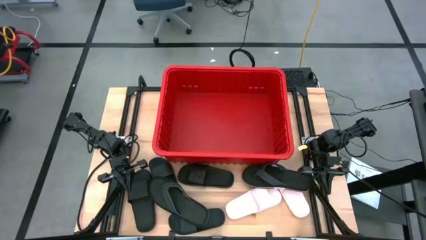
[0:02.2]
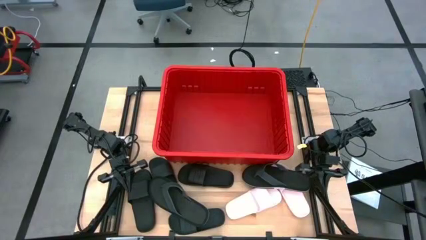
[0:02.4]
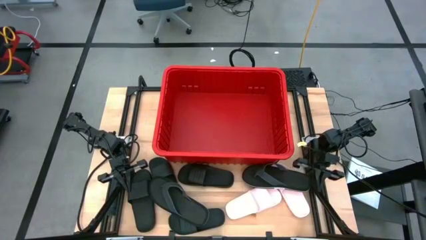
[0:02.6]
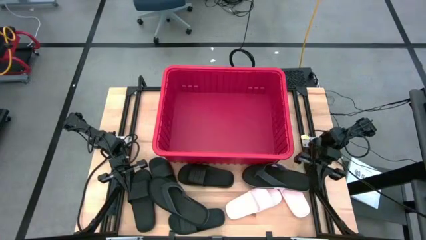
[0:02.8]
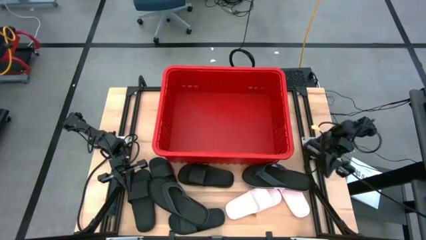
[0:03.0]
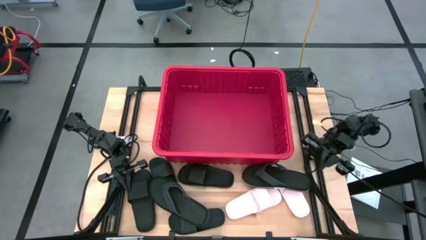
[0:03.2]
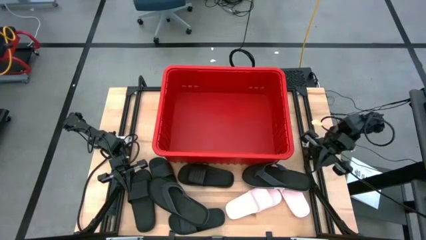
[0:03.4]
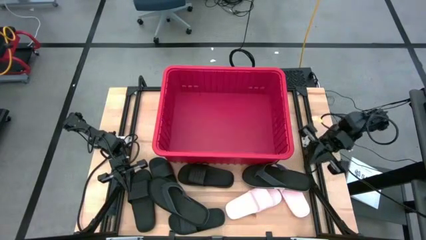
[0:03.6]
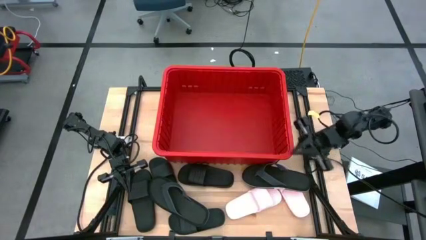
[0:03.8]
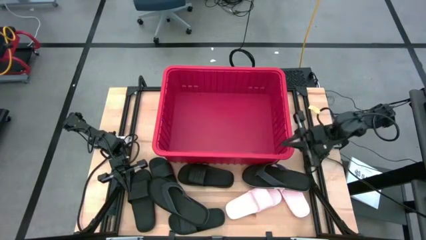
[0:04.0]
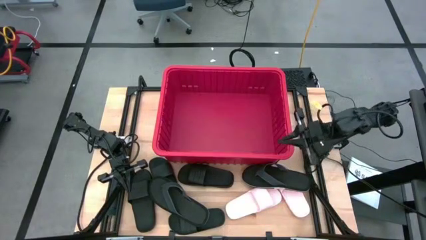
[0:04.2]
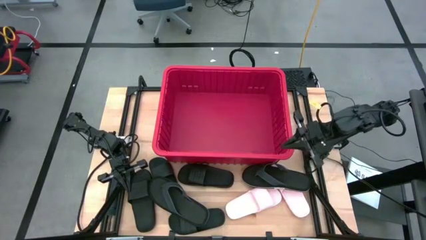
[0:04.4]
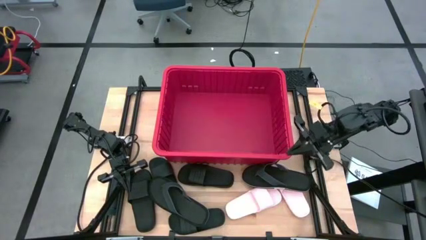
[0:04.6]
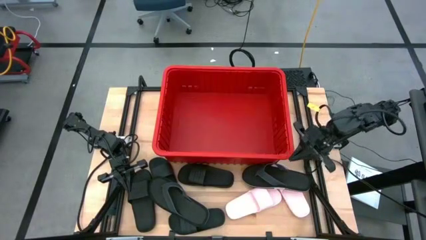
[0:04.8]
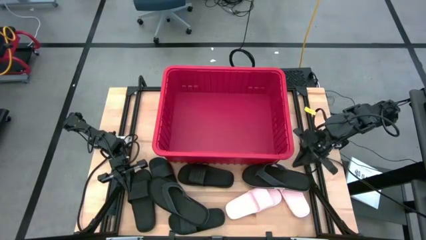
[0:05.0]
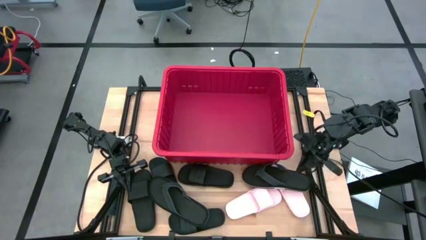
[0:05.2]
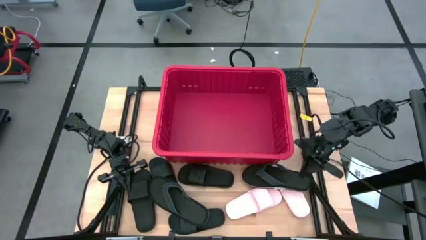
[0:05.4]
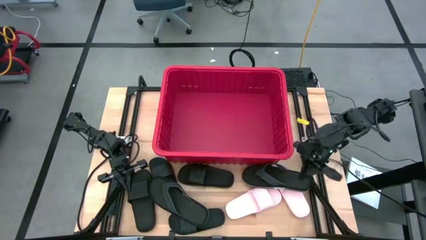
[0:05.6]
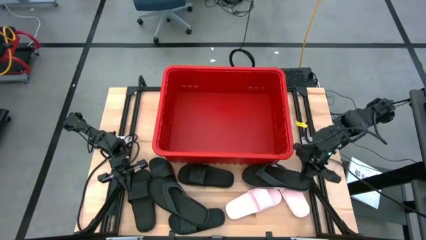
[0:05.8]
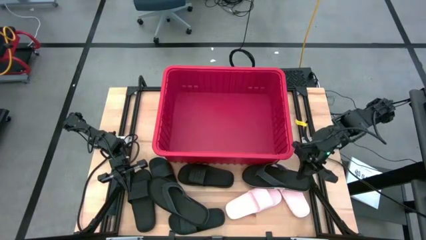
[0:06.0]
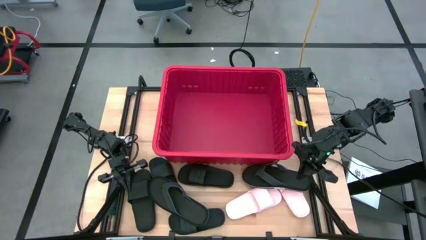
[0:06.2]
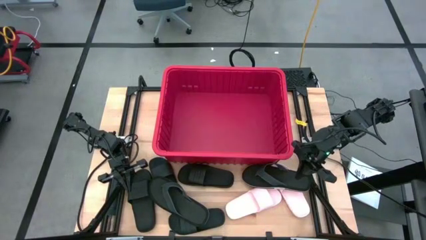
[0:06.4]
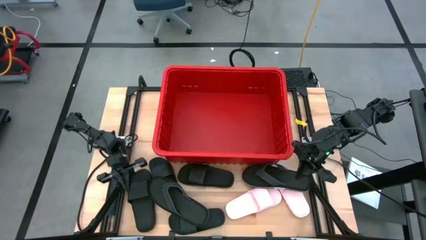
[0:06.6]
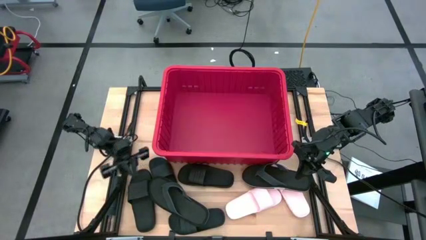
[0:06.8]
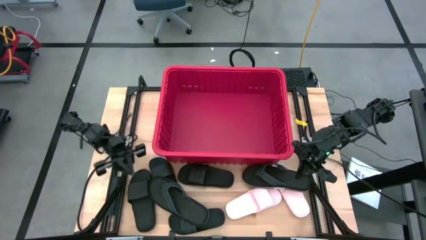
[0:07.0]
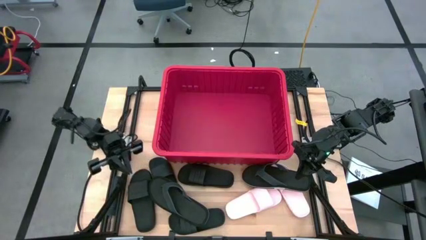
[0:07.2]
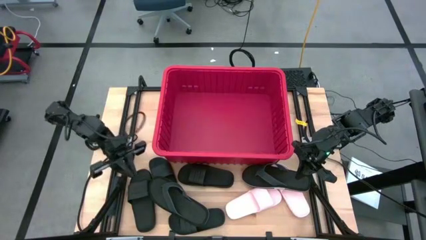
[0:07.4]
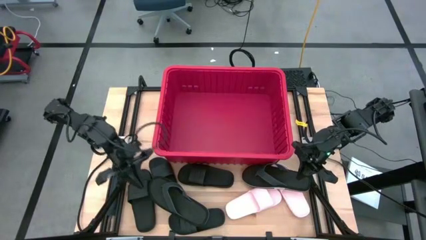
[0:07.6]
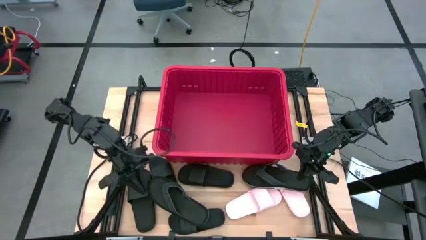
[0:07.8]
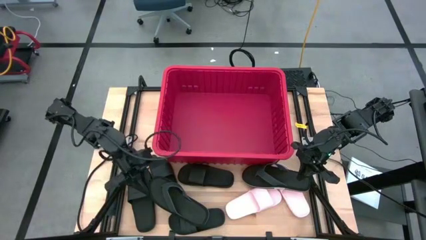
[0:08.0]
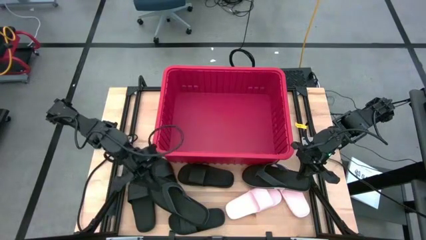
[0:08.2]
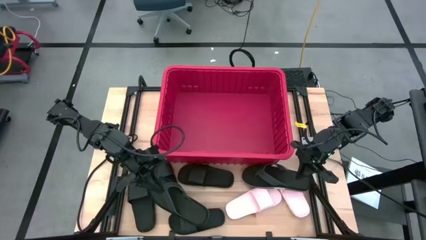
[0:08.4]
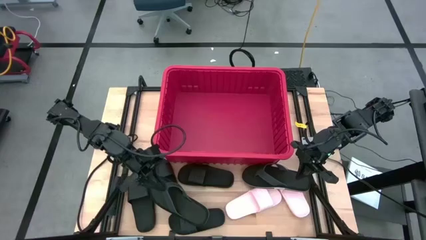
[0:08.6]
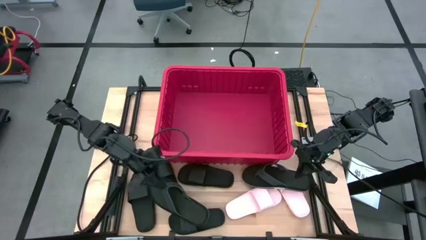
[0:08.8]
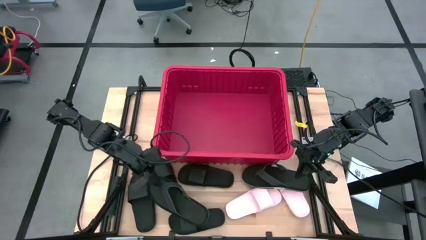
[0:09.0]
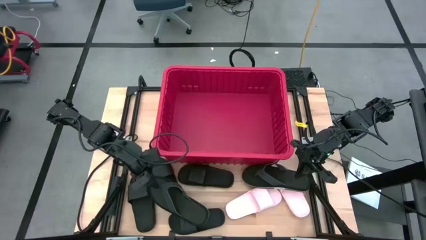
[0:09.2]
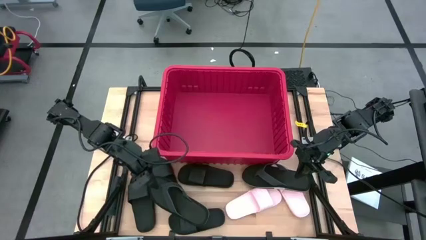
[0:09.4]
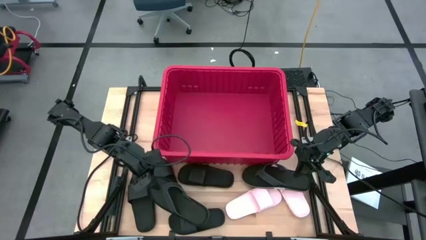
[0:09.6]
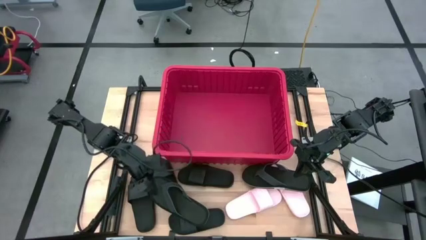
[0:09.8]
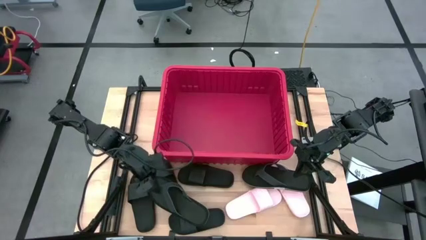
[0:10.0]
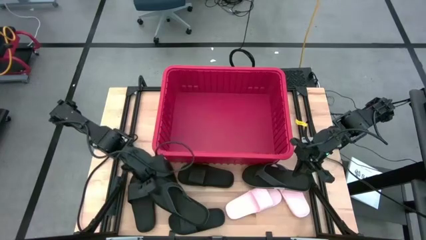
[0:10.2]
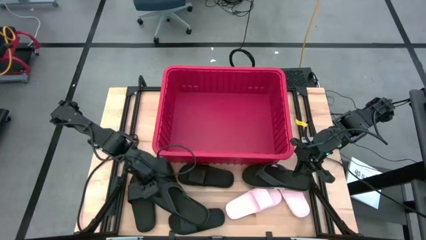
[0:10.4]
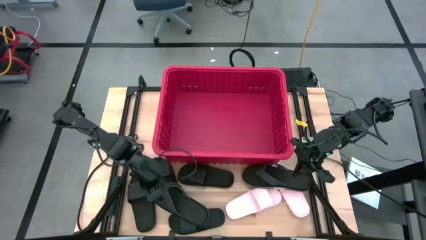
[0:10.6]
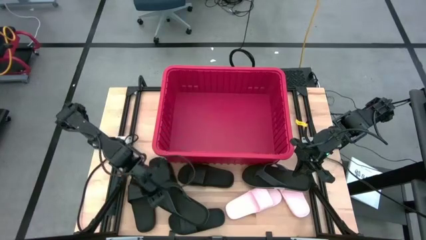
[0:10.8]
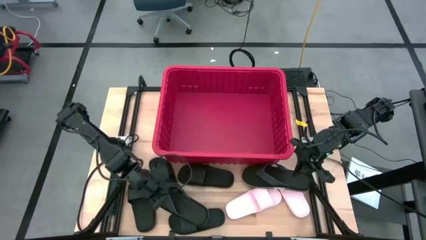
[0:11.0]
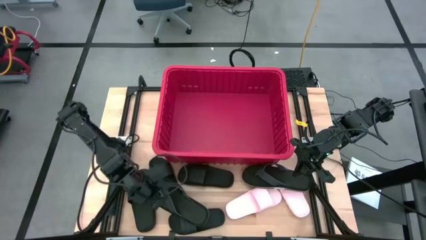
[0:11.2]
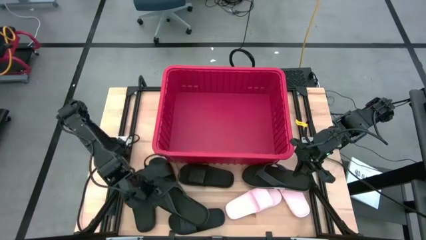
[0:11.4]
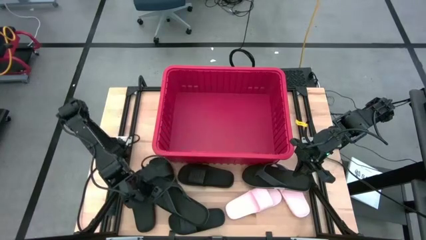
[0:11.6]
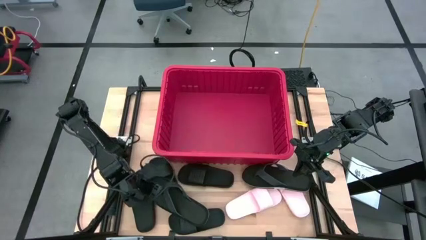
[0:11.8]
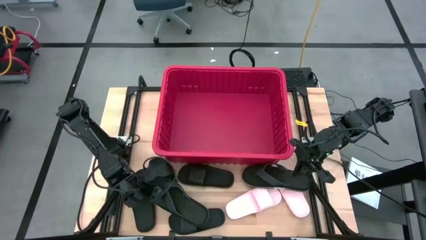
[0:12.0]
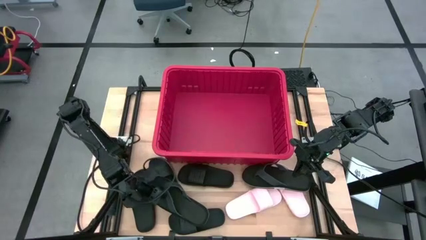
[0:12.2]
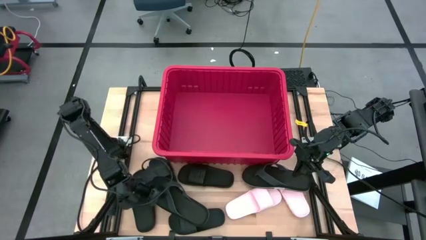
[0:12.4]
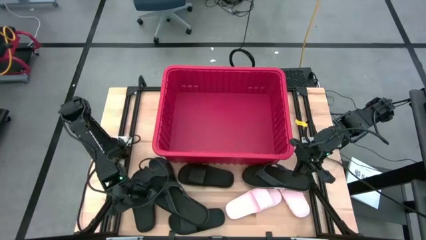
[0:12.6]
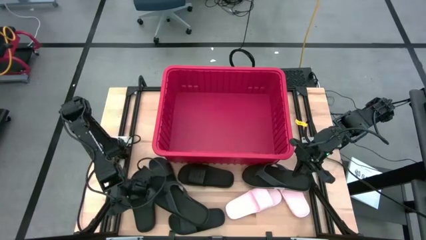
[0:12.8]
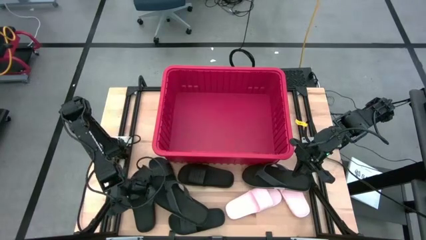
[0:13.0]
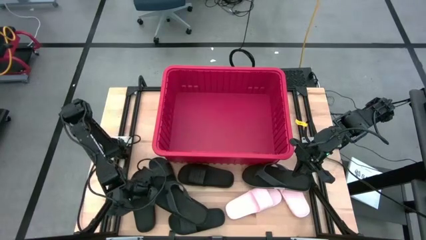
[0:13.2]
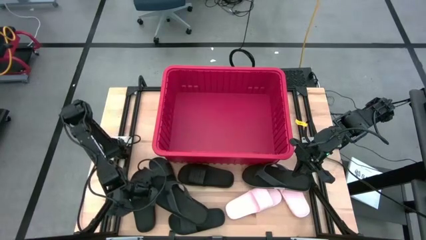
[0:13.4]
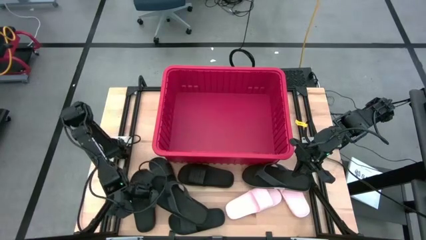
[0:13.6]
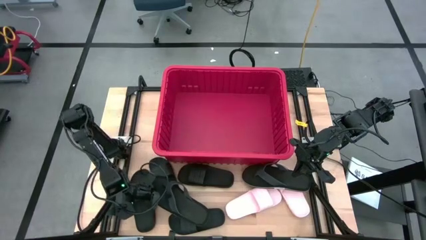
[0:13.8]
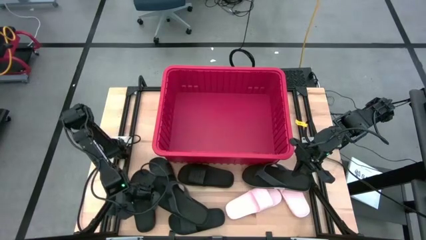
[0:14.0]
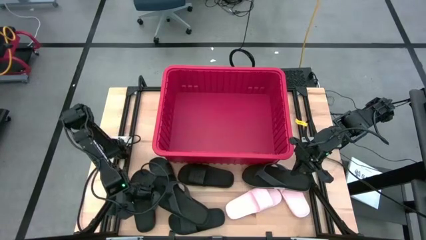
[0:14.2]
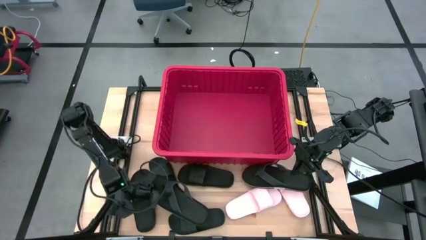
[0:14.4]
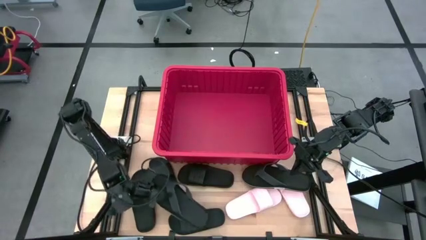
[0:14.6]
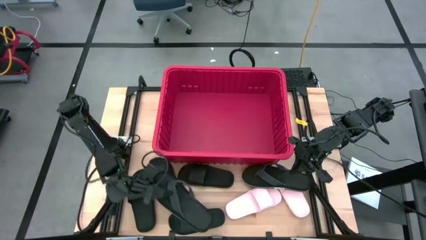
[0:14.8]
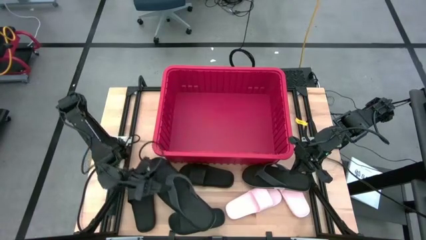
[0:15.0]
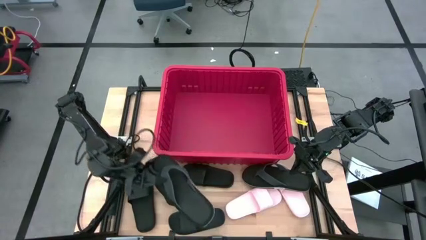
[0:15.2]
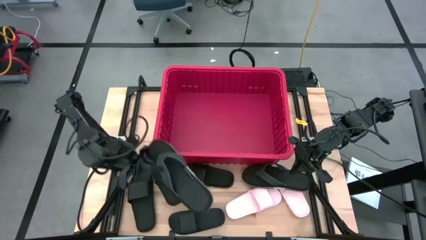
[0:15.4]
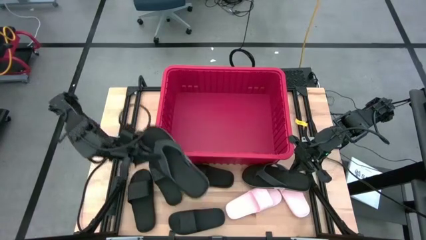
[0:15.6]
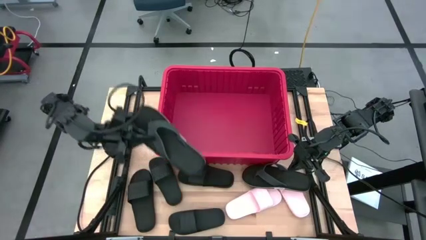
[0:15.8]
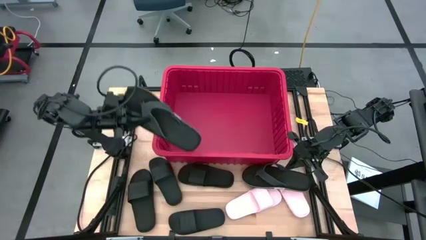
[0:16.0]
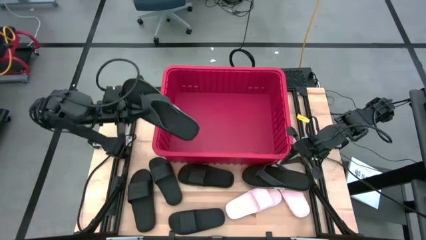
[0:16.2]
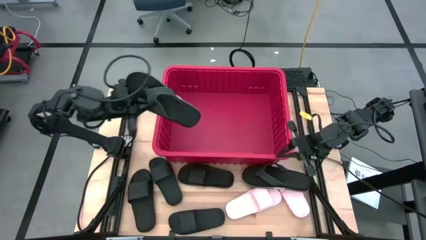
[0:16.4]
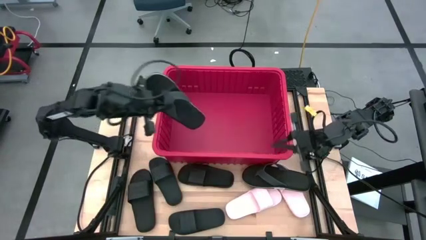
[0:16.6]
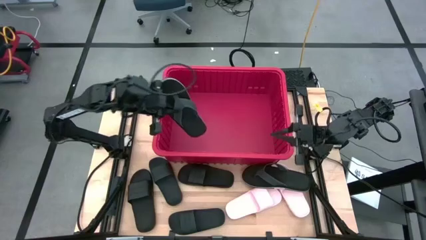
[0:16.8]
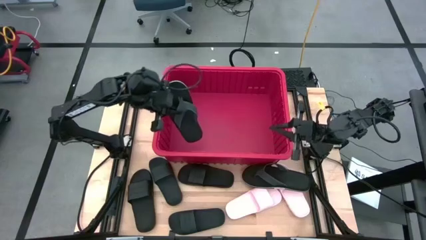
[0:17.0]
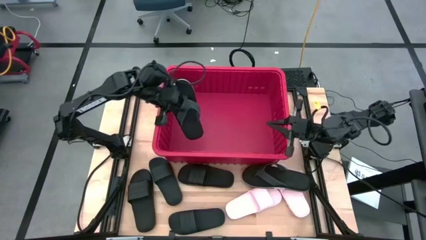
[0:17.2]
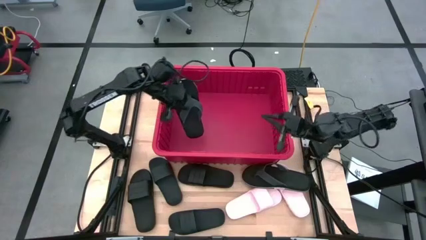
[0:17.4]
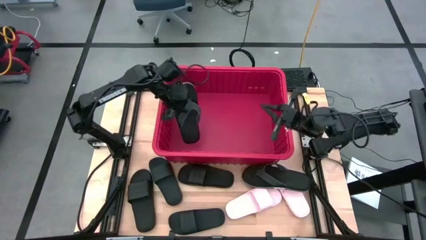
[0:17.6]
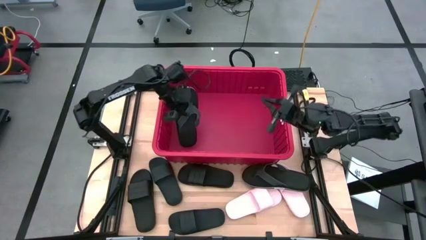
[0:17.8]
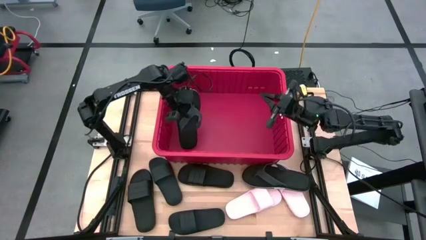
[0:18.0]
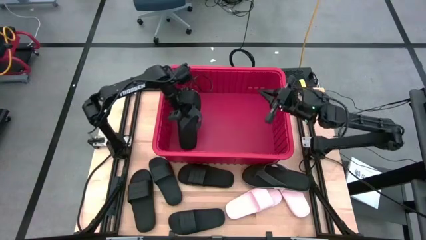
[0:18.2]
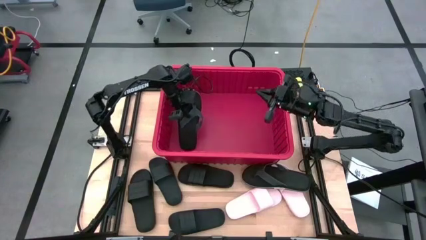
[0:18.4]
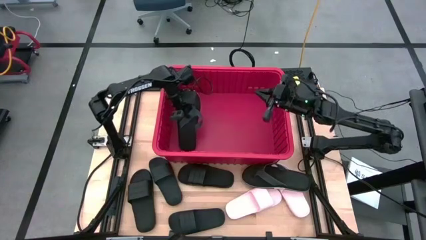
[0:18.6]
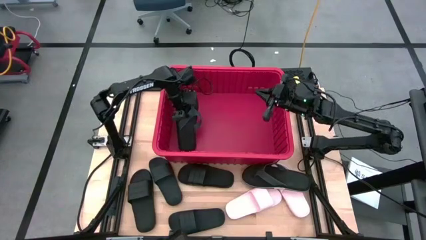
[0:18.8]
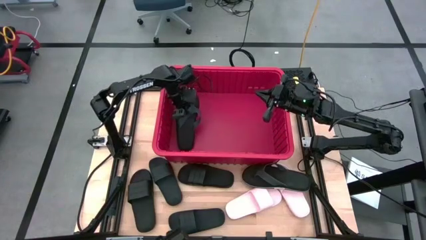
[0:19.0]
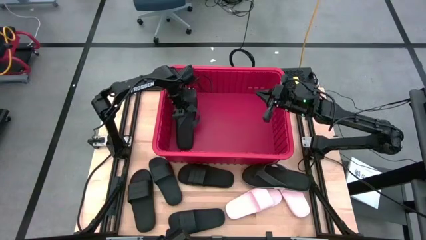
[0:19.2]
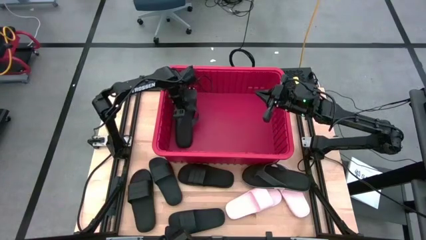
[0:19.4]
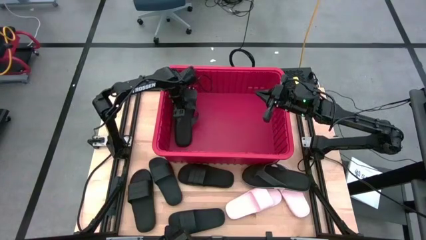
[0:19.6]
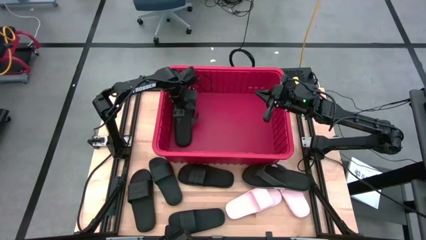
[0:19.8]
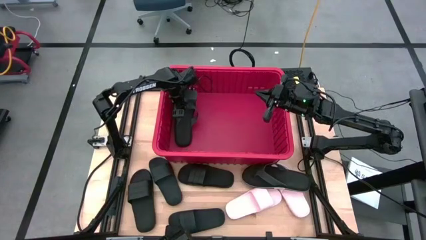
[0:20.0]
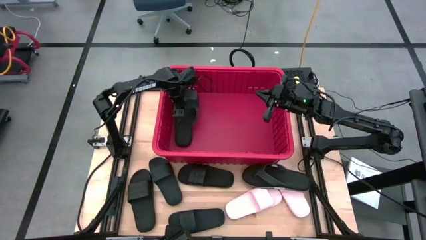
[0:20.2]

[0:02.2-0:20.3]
Task: Pick and place slides into bin
Put the black slipper into the red bin
